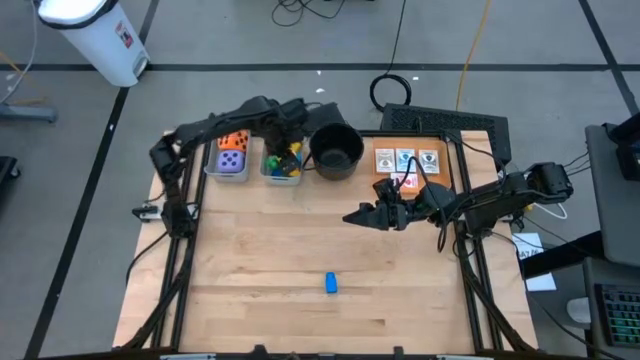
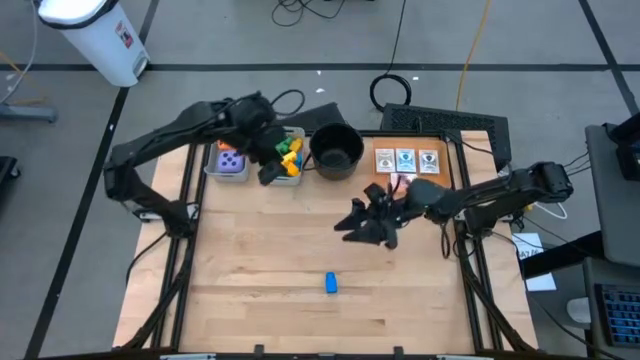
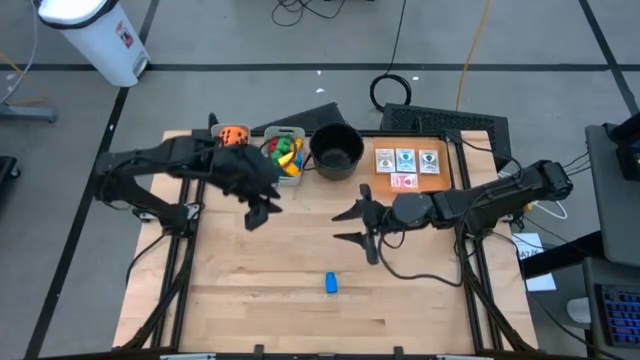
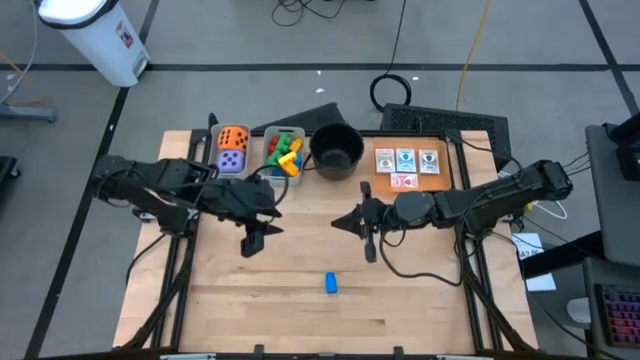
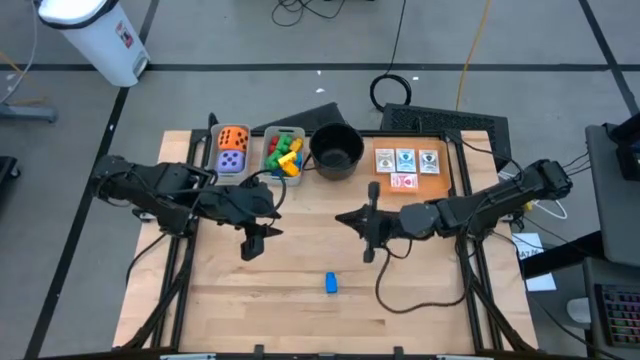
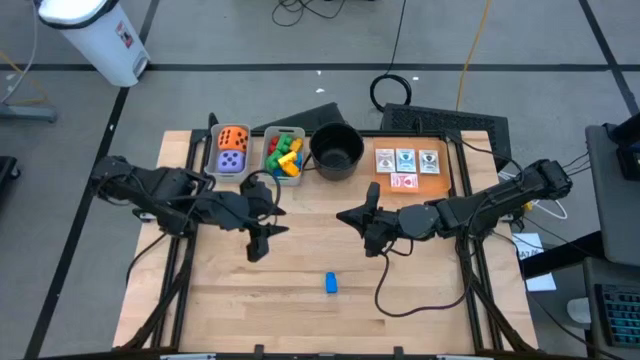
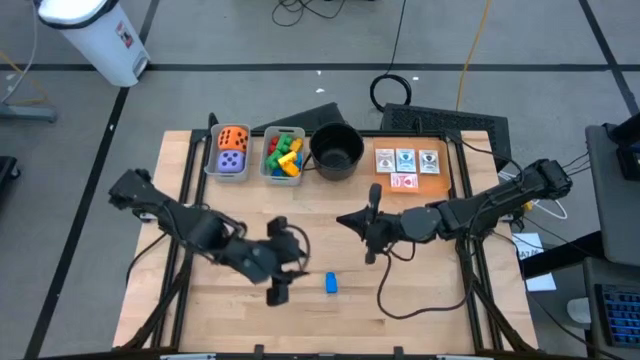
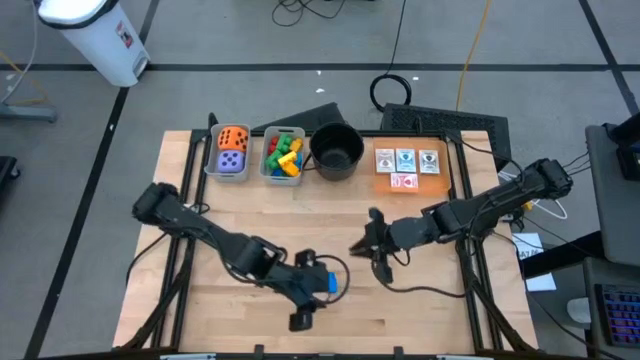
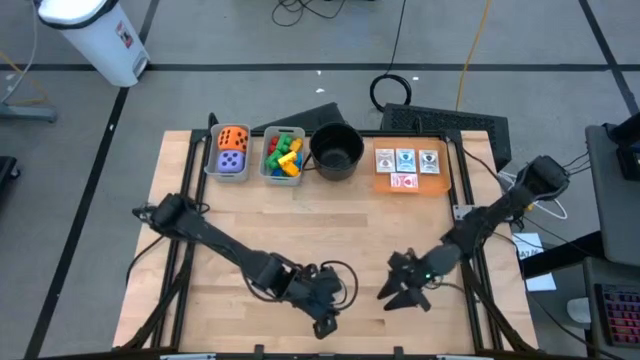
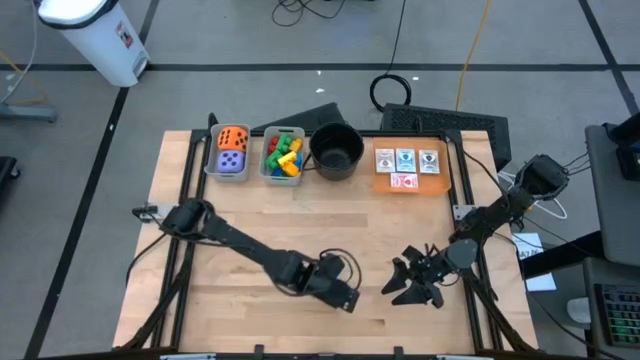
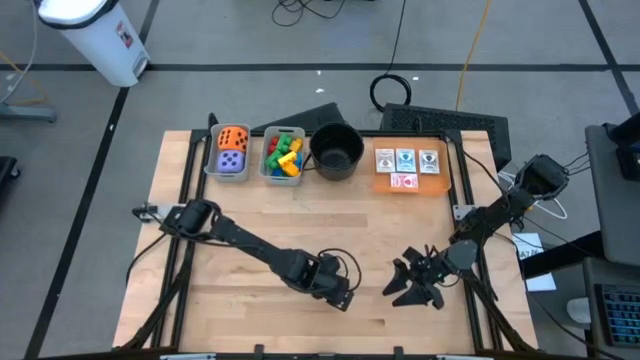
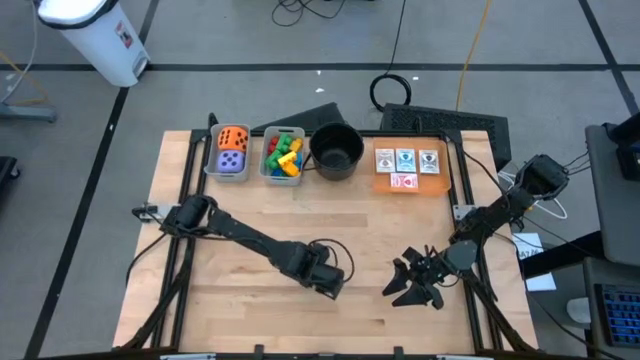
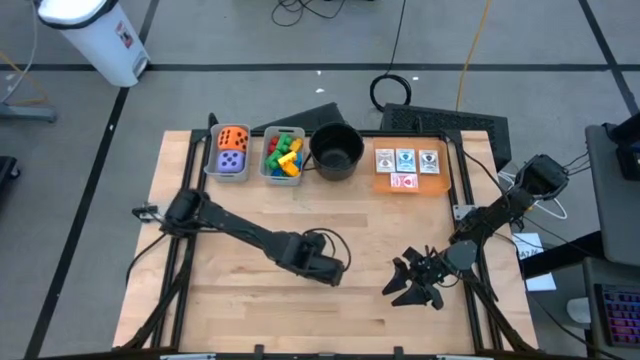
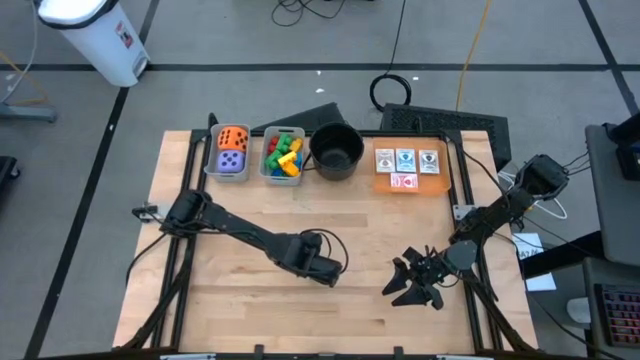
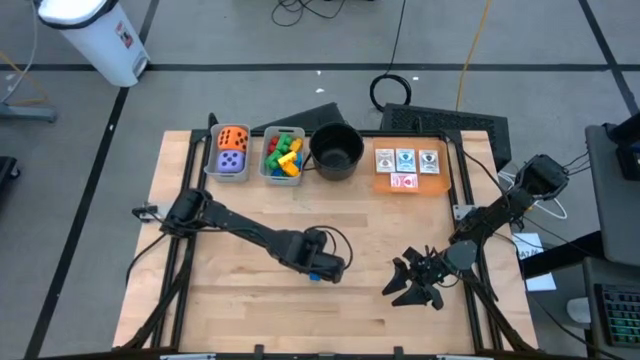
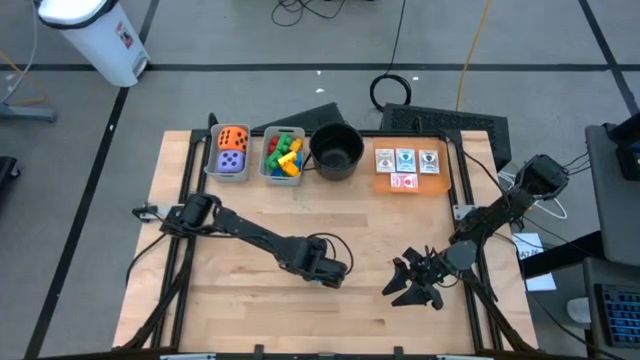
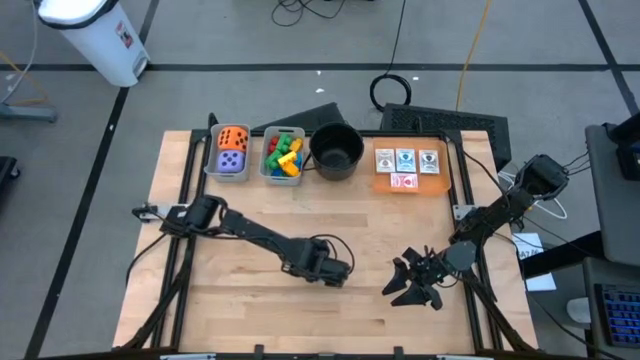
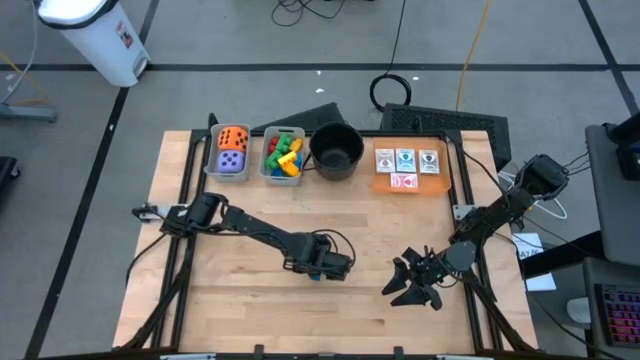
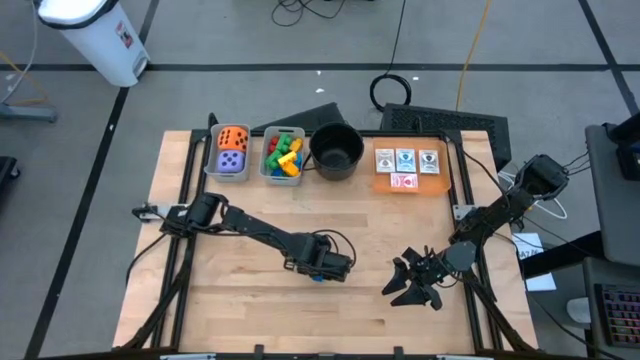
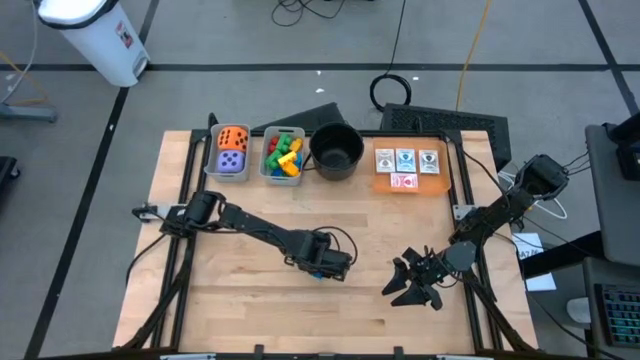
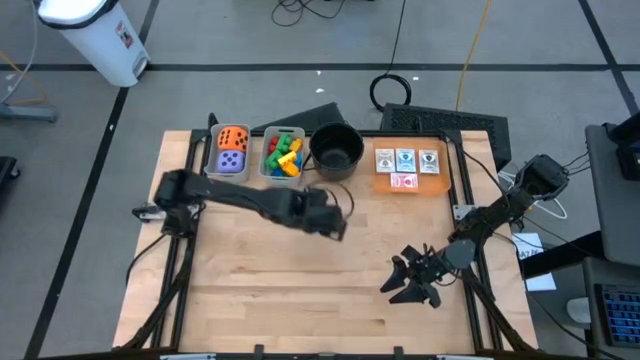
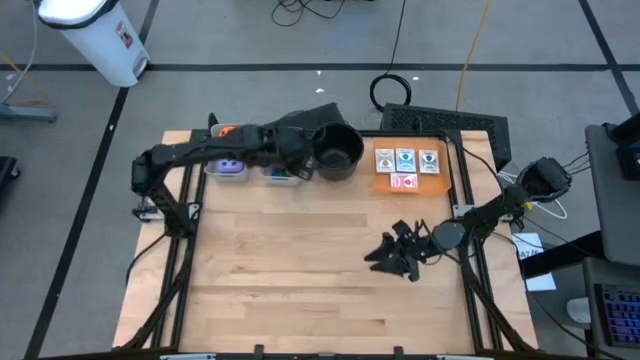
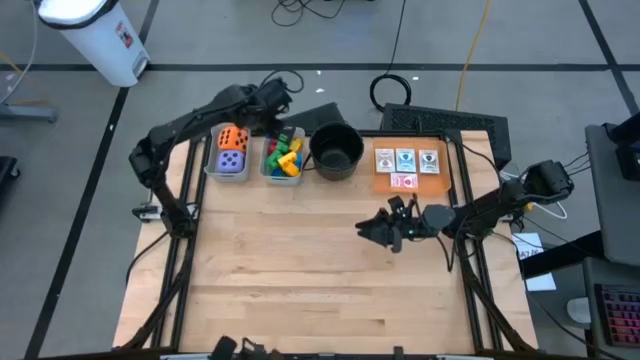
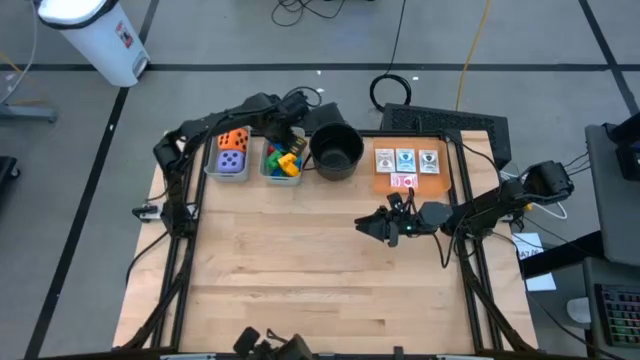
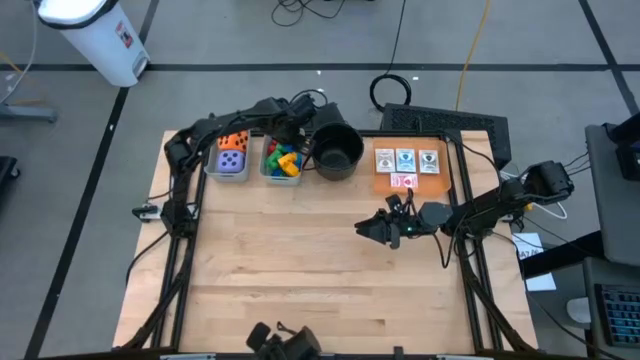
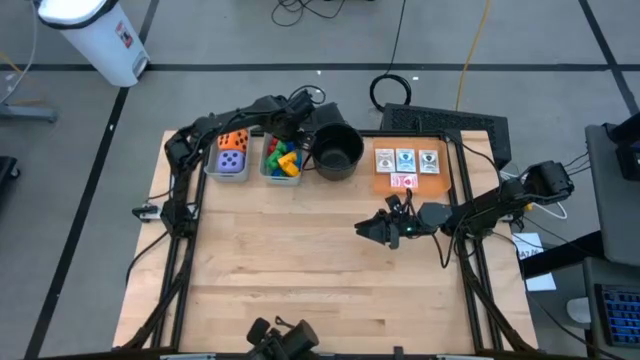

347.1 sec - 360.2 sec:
Task: Pick & Place Toys
Put the blue game piece into the right gray bin

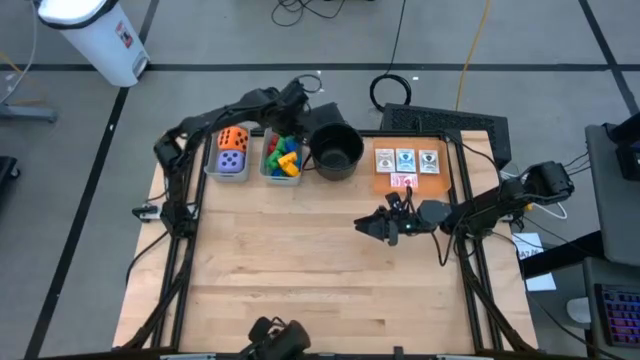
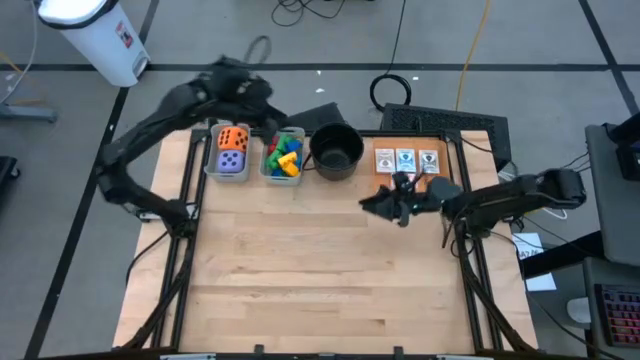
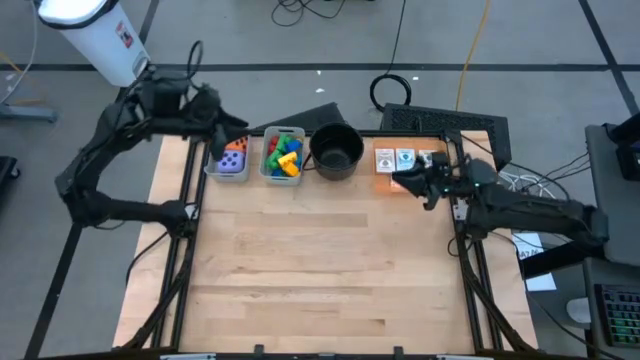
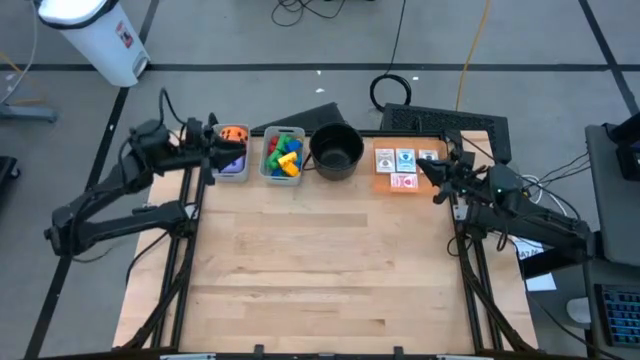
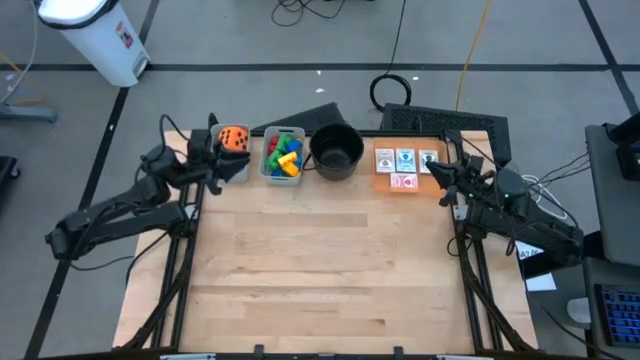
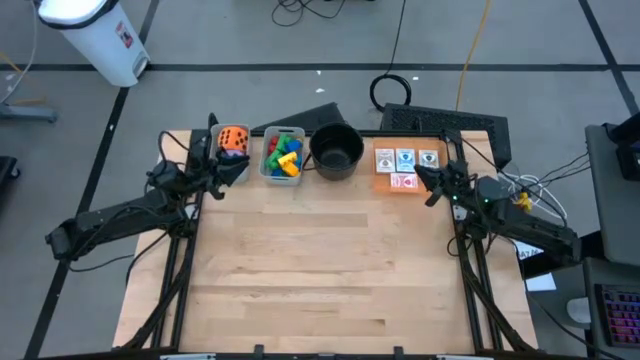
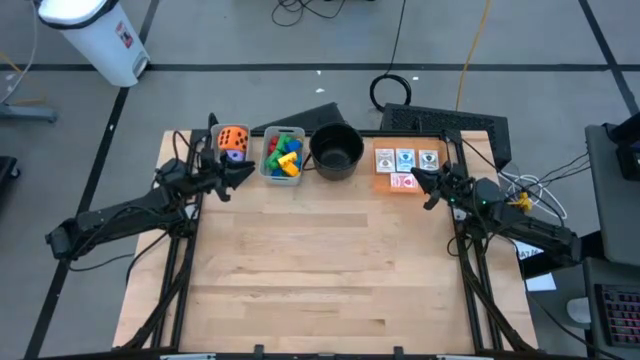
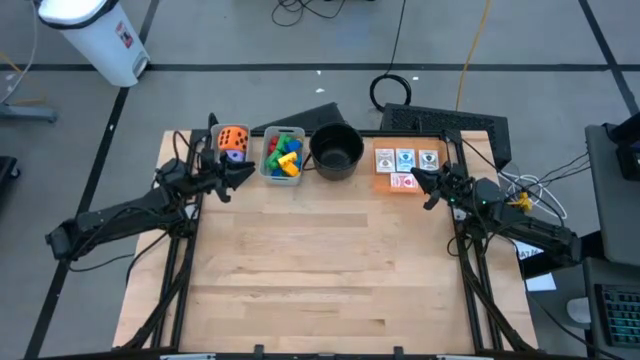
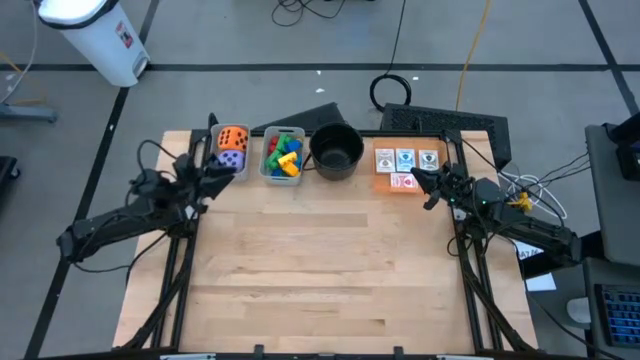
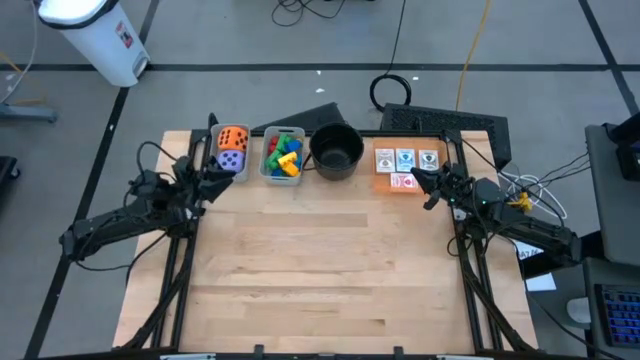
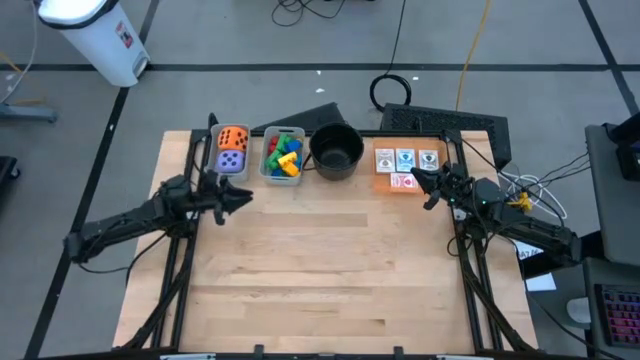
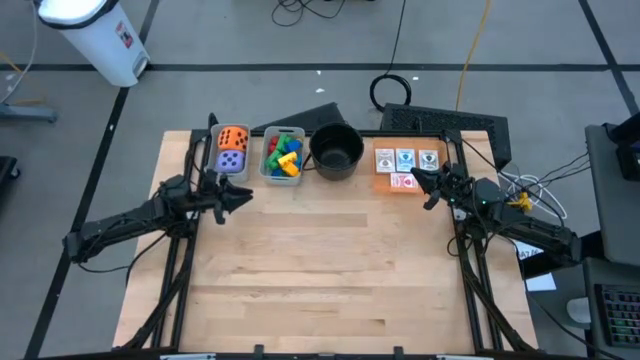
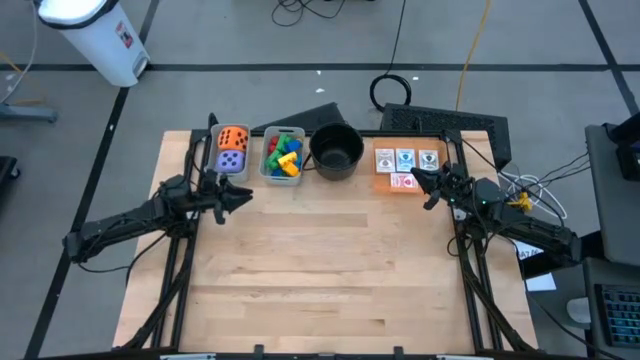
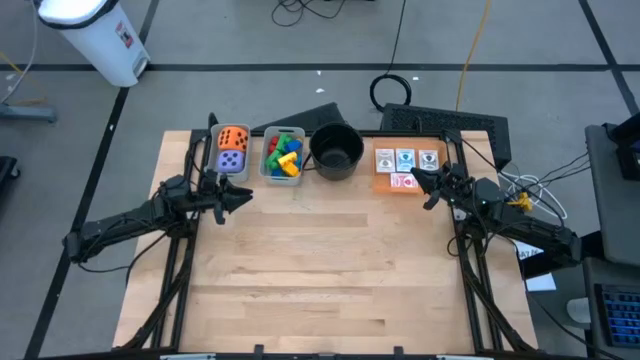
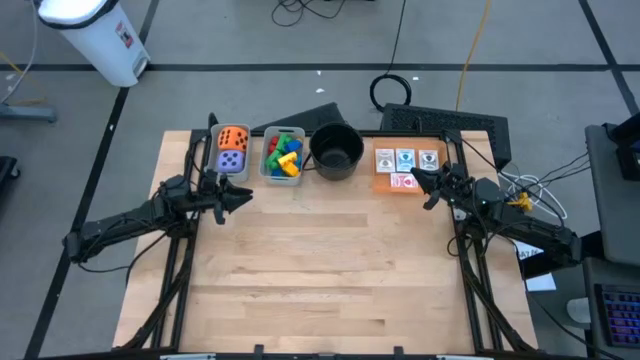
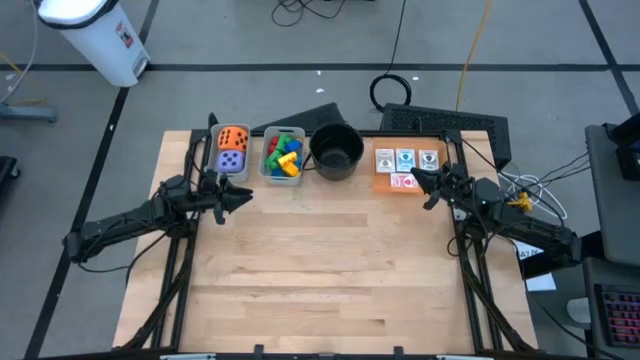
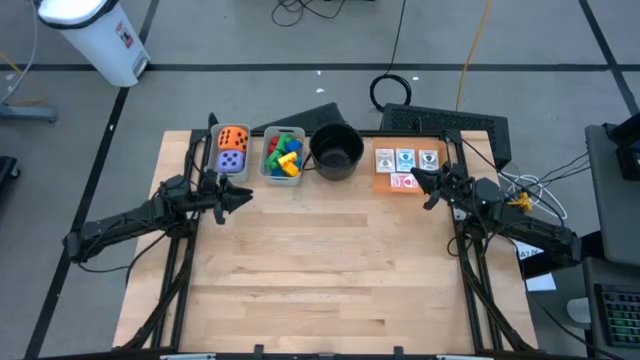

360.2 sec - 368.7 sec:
Return to Home Position
